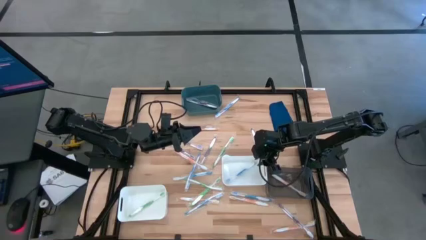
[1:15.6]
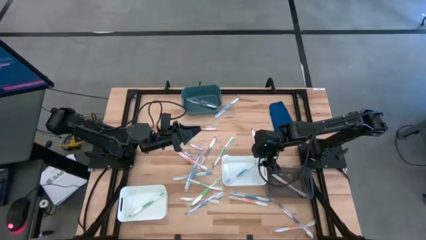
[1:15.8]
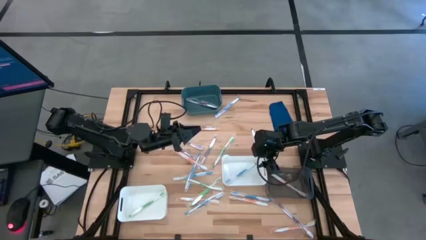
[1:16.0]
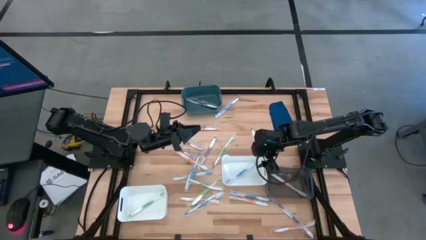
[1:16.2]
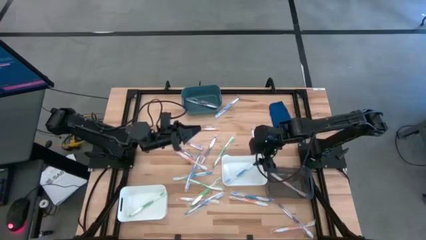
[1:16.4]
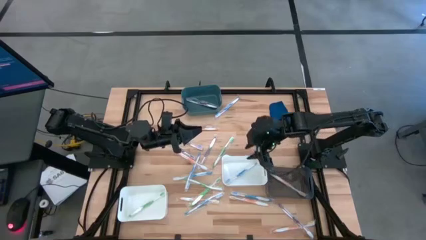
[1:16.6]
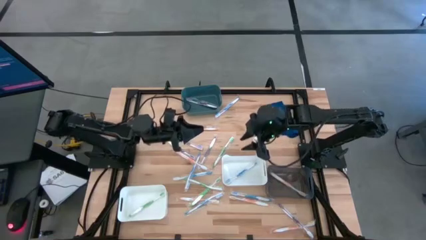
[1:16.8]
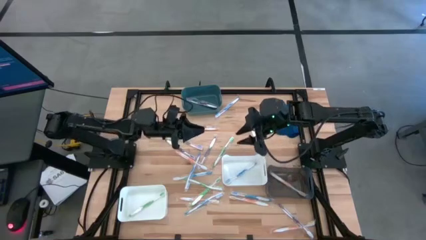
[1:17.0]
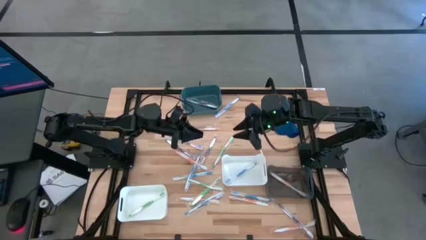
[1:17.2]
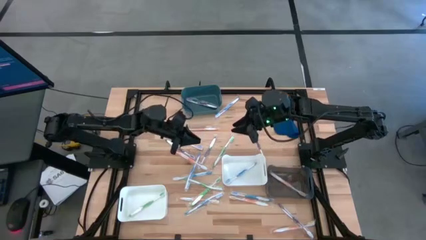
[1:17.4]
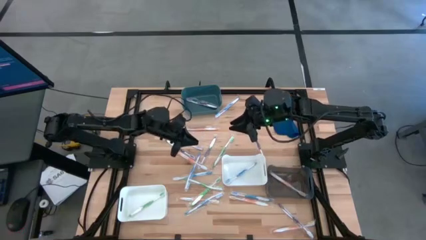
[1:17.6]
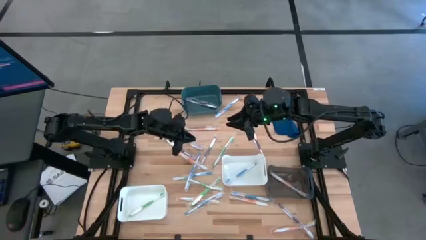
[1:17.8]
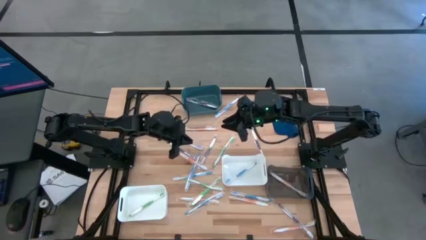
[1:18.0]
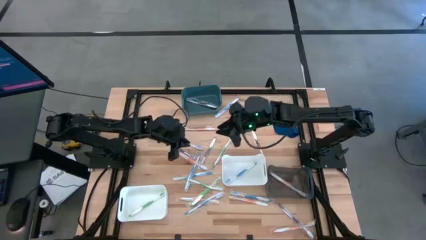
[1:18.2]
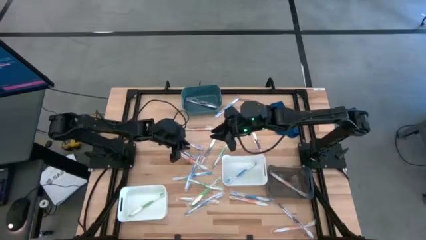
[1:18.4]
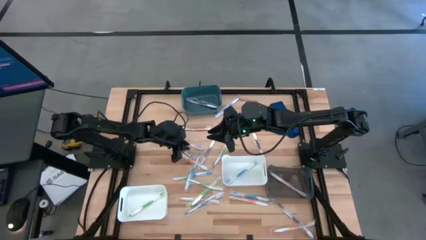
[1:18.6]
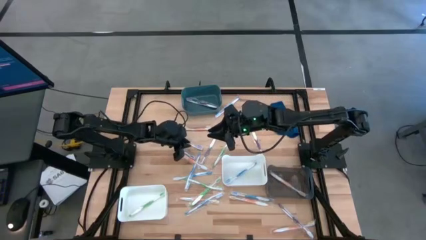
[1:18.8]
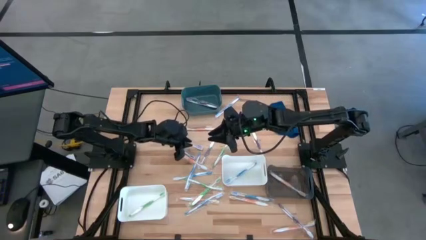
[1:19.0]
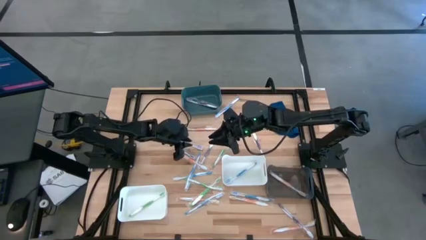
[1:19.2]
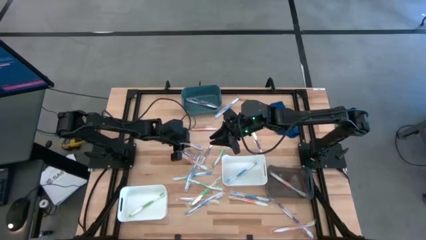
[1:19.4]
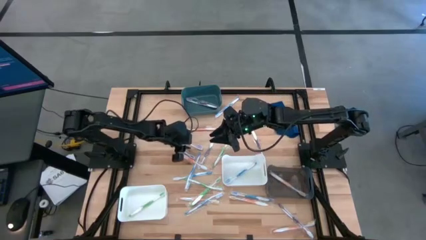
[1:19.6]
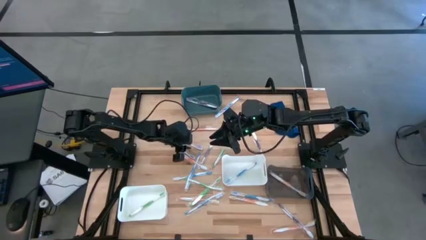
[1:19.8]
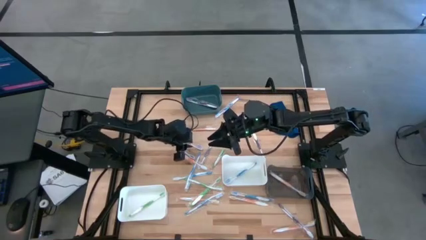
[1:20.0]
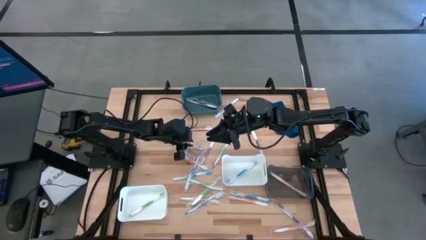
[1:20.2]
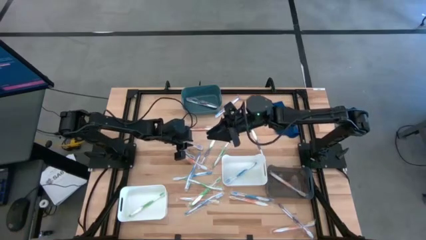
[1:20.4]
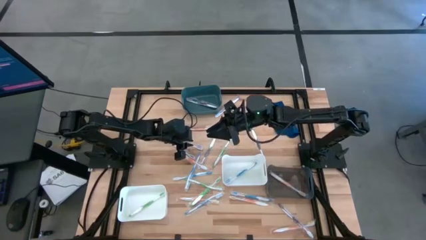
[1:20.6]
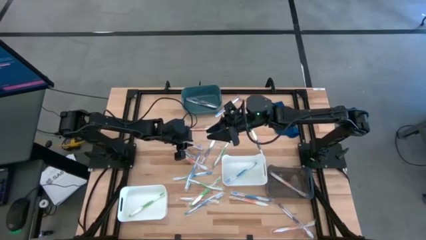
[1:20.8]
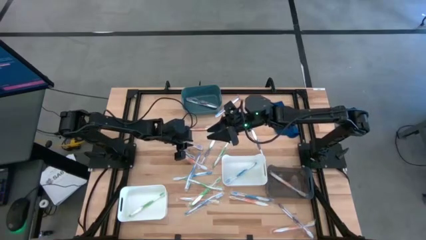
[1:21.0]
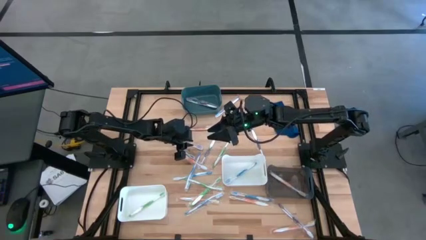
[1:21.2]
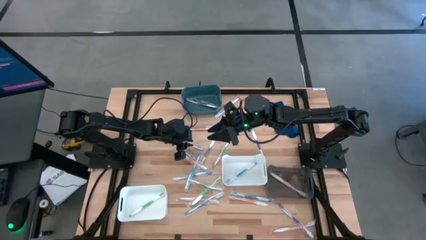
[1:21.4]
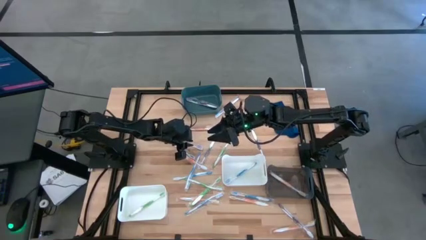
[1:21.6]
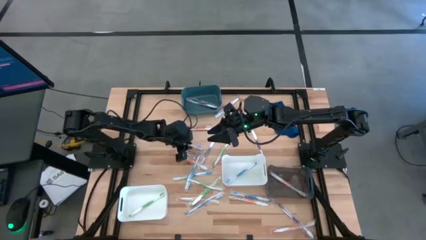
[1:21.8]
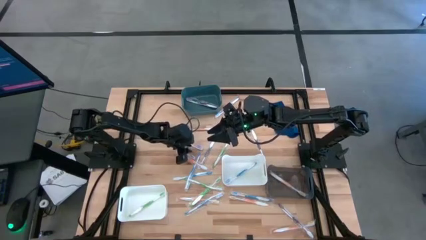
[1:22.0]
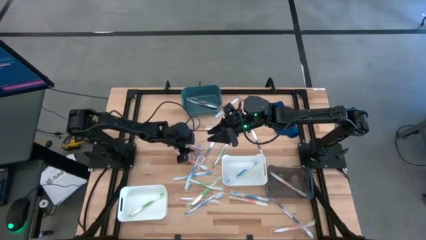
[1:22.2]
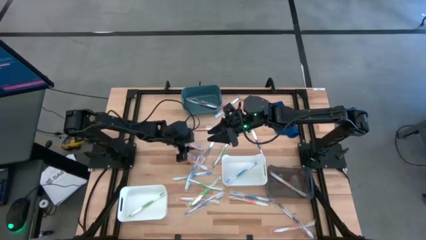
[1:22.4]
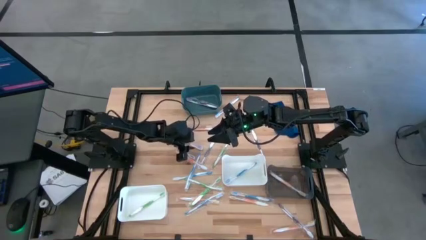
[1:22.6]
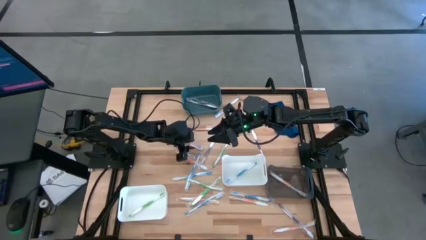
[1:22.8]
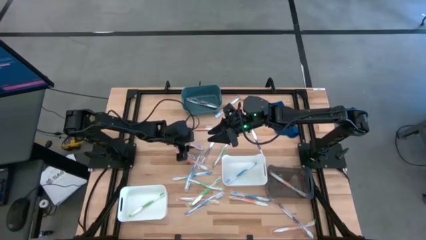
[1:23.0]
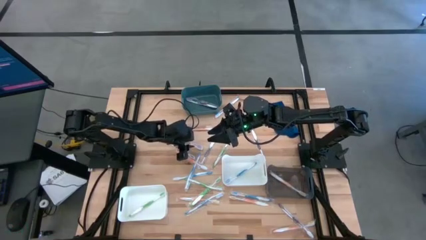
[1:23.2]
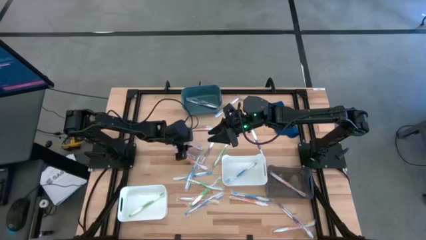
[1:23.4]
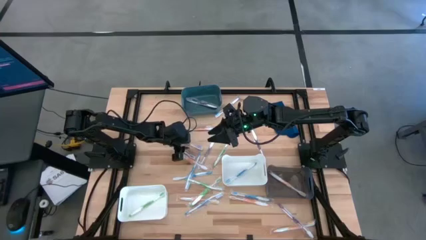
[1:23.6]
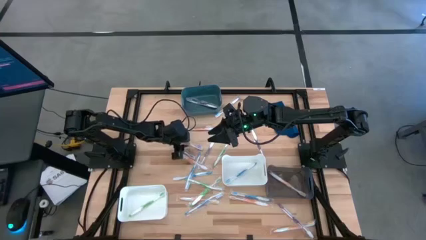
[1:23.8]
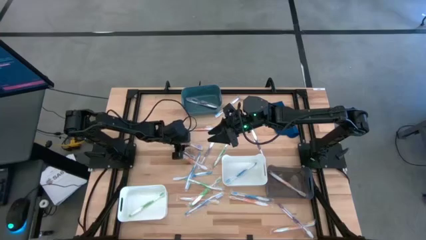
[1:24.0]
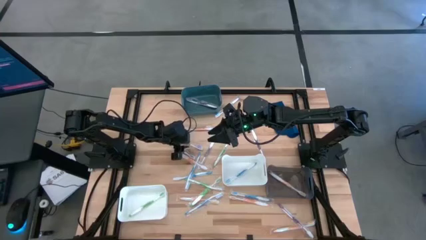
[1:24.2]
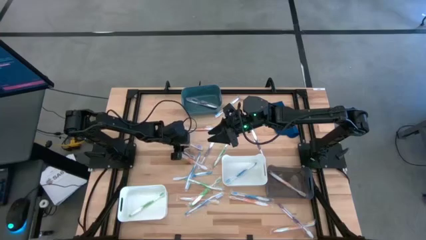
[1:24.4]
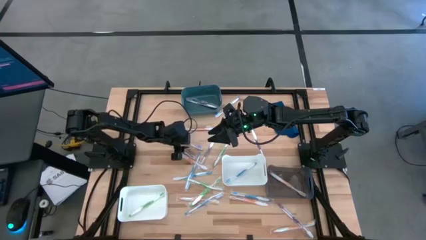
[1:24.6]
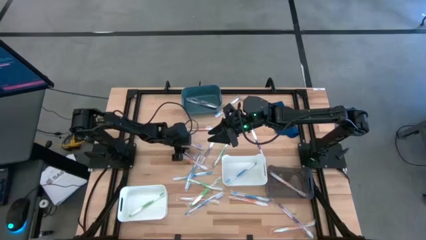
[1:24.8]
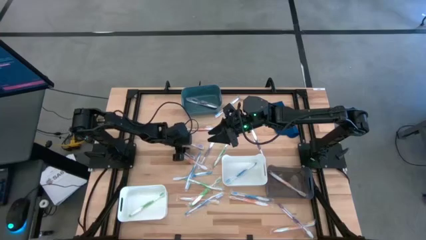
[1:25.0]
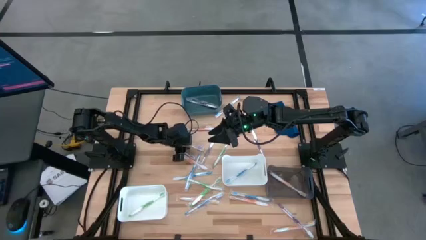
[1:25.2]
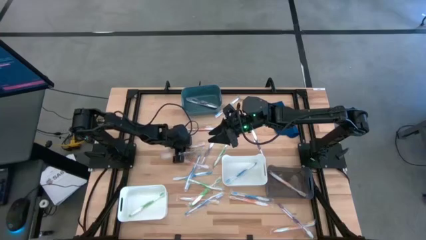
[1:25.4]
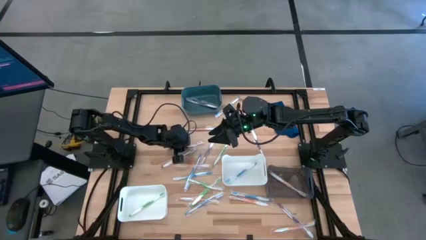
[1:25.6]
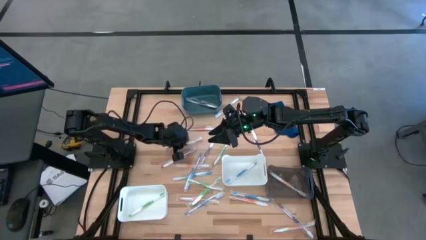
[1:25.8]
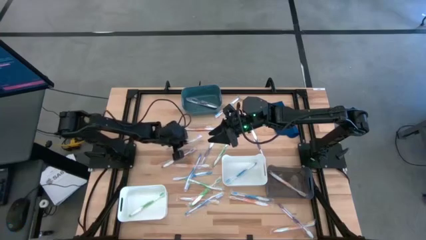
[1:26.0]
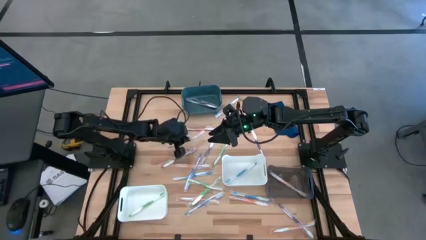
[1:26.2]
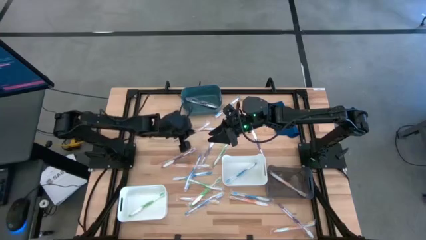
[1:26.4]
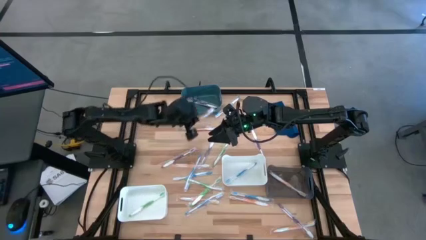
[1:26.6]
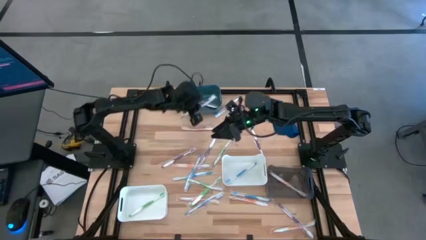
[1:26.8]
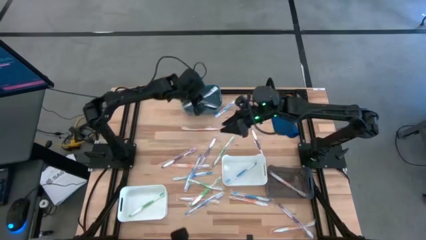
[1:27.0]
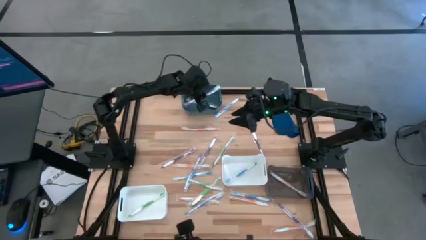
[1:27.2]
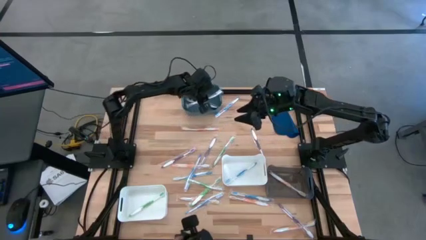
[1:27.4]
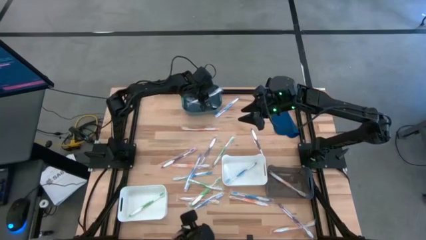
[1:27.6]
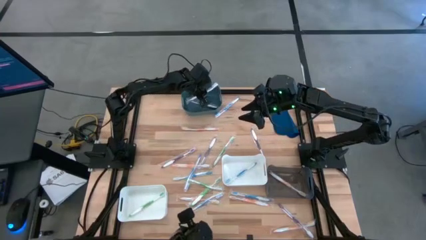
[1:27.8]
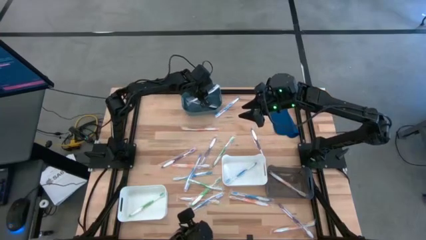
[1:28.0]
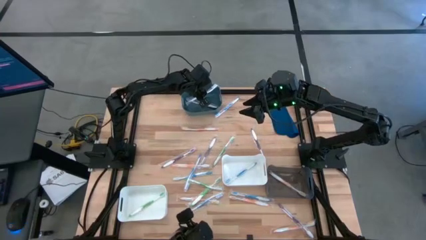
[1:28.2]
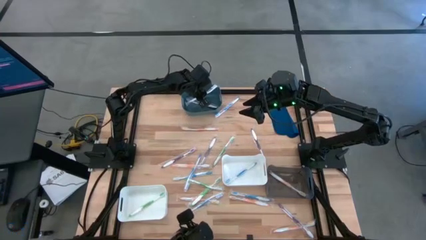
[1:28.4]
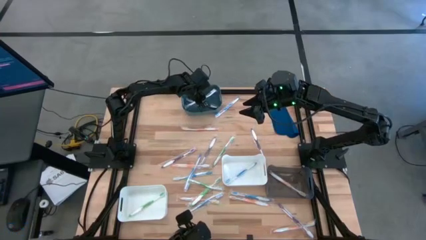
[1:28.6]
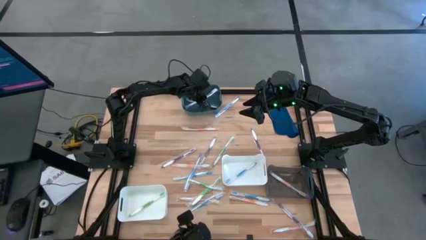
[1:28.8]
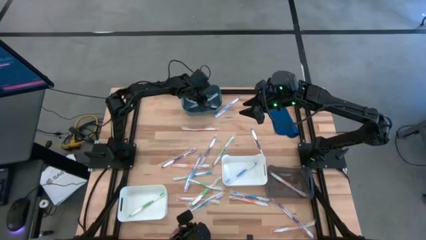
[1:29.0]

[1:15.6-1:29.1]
Task: Pick & Place Toothbrushes
Put the violet toothbrush into the blue bin

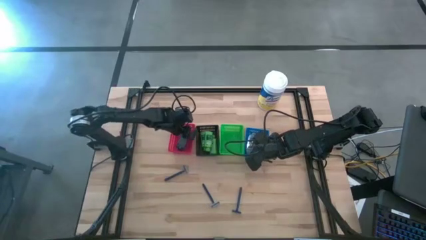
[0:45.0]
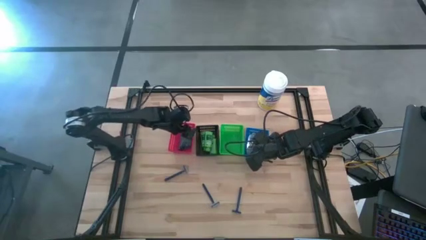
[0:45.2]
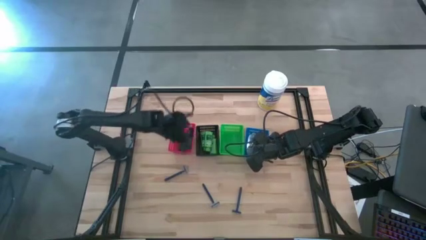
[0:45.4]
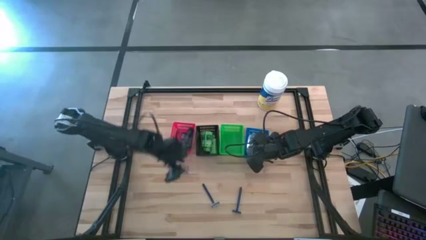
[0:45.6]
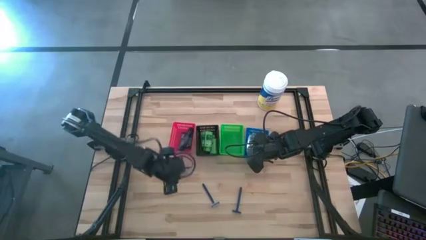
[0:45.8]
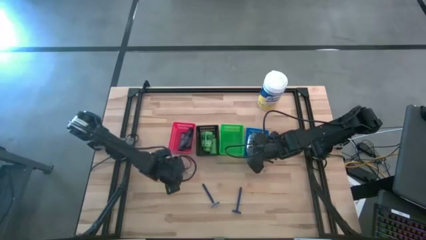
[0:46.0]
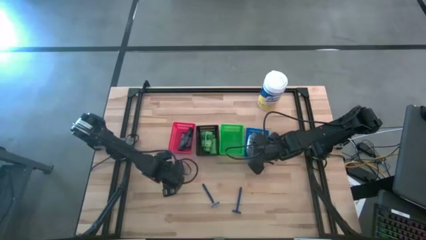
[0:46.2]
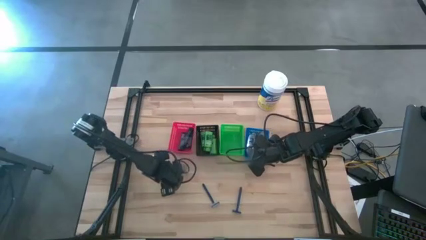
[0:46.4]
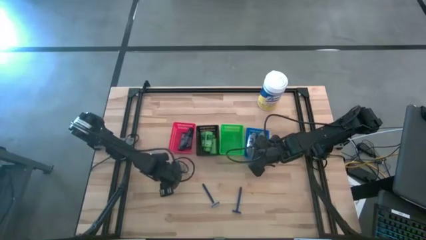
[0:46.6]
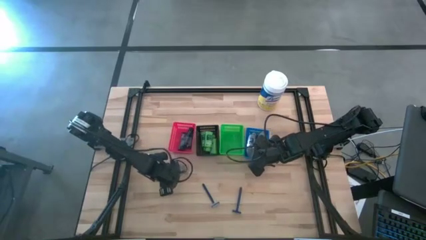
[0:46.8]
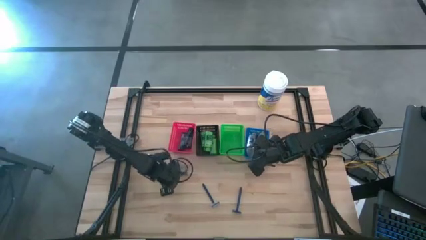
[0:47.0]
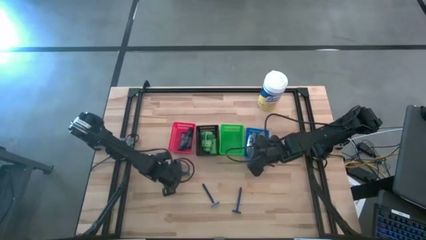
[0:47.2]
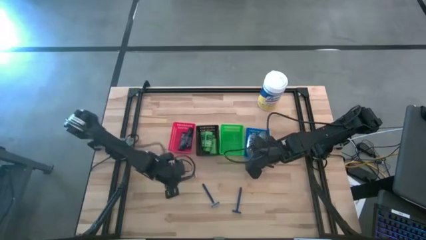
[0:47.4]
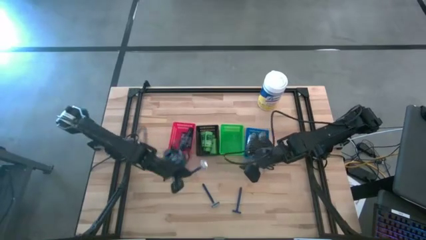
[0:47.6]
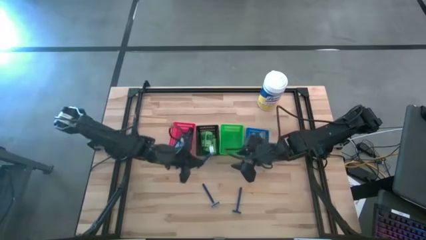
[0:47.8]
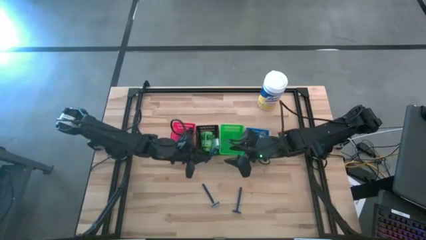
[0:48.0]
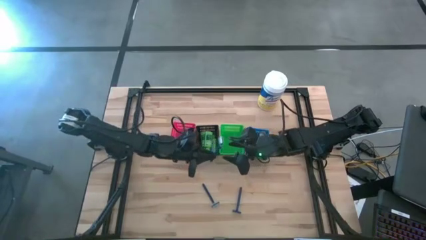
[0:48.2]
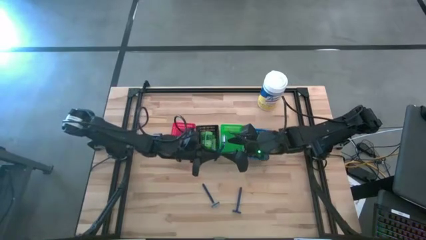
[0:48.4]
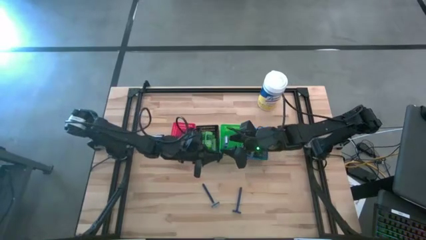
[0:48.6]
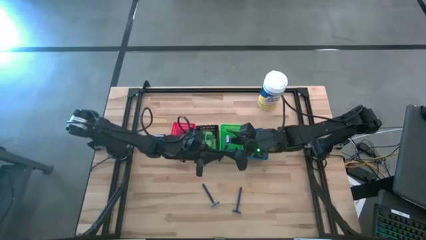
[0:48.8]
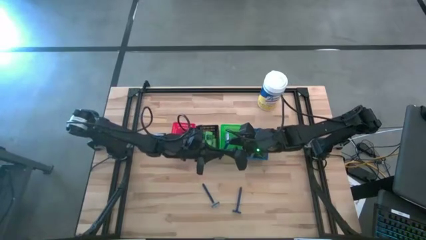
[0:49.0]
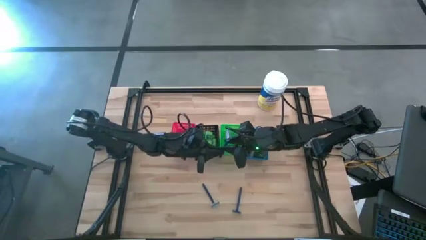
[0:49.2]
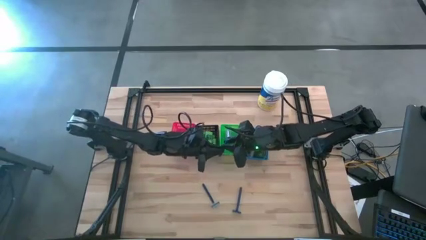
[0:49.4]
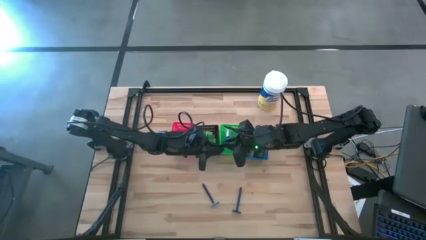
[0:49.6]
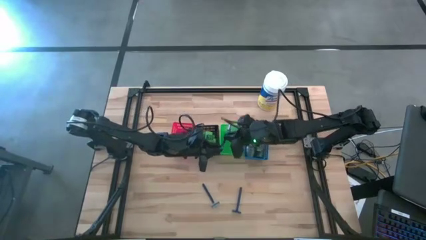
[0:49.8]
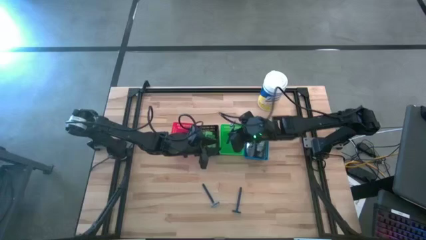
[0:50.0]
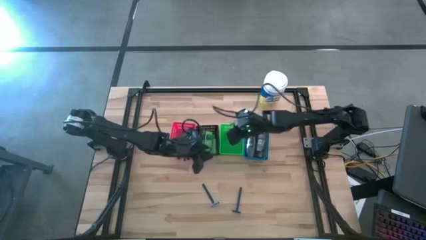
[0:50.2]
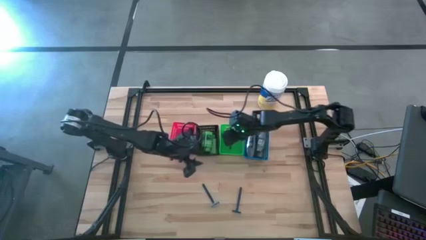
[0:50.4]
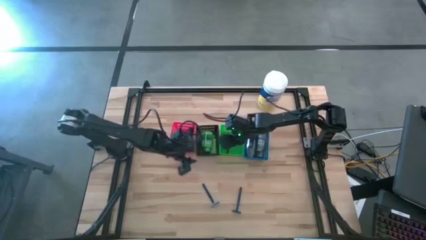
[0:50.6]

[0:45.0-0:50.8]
Task: Pick & Place Travel size toiletries
Put the blue razor into the green bin
